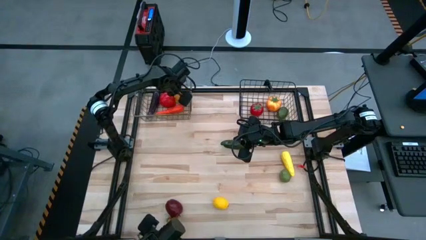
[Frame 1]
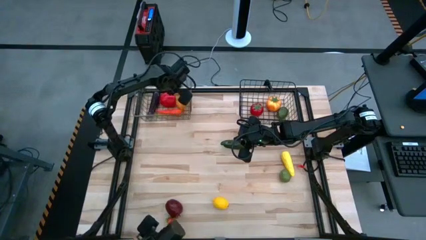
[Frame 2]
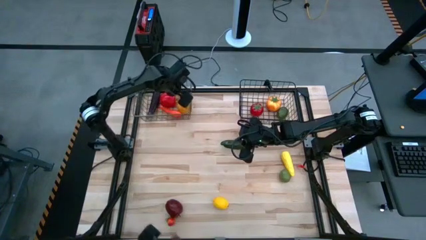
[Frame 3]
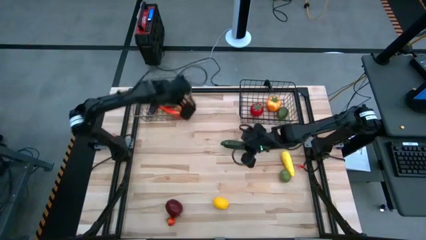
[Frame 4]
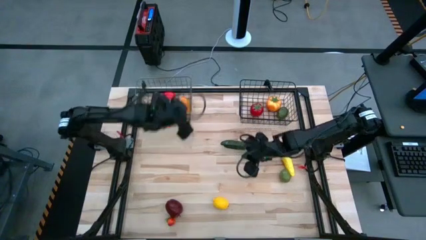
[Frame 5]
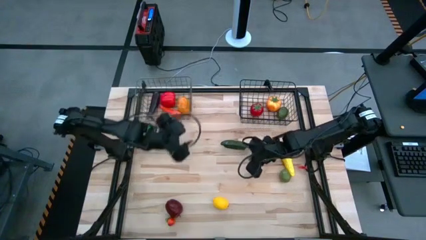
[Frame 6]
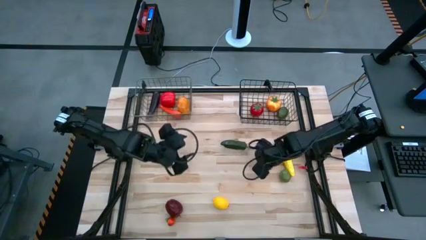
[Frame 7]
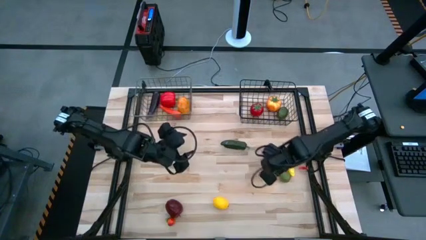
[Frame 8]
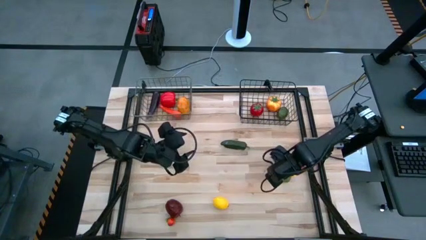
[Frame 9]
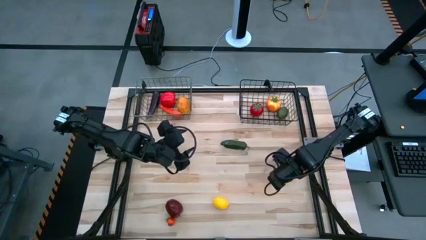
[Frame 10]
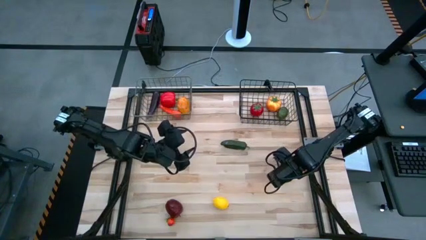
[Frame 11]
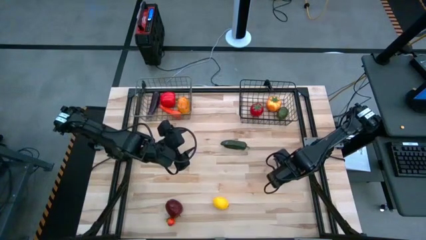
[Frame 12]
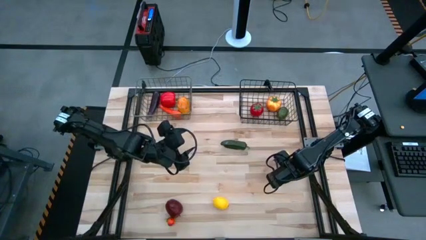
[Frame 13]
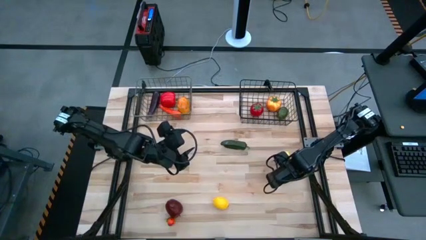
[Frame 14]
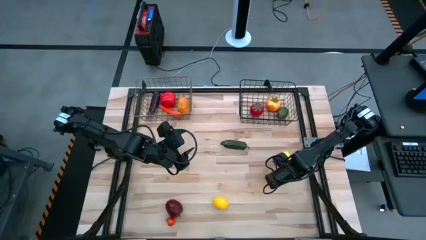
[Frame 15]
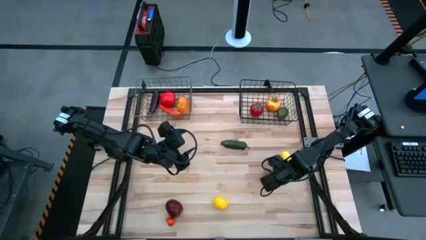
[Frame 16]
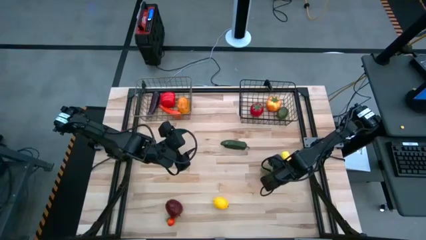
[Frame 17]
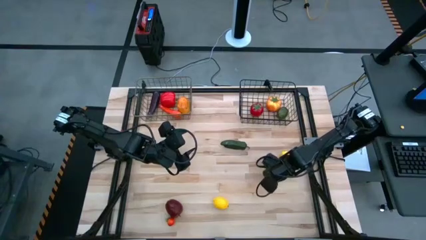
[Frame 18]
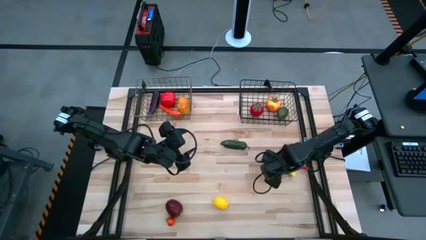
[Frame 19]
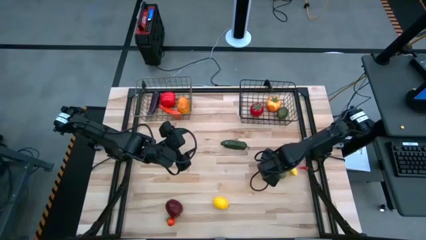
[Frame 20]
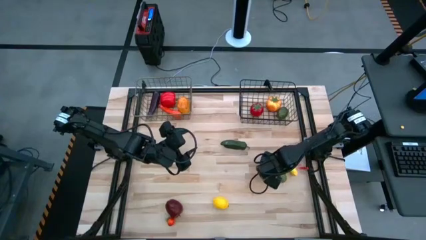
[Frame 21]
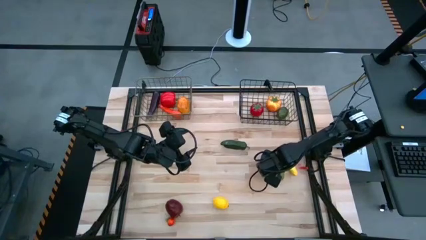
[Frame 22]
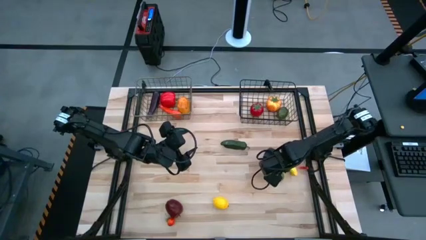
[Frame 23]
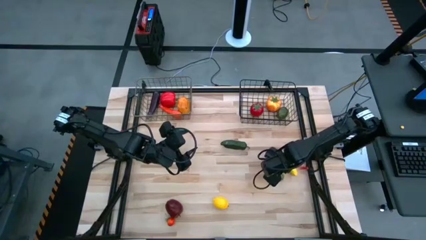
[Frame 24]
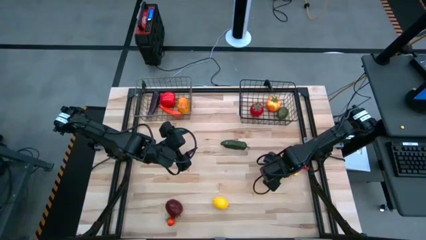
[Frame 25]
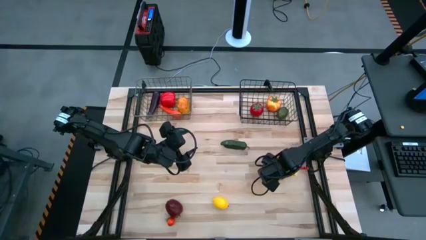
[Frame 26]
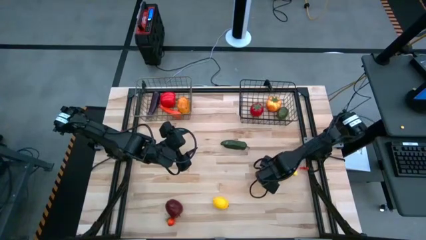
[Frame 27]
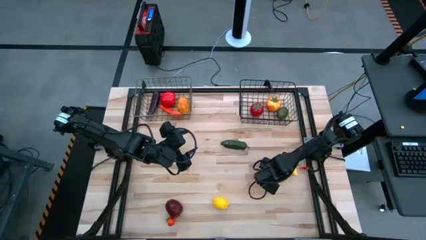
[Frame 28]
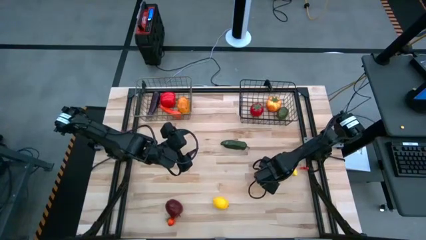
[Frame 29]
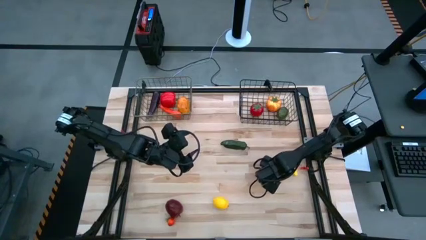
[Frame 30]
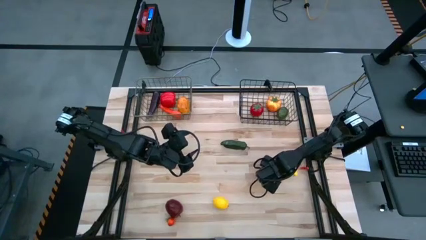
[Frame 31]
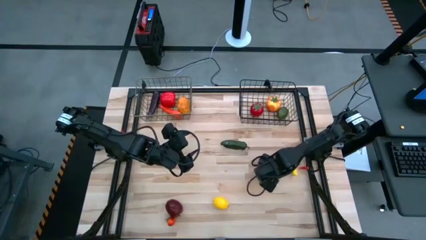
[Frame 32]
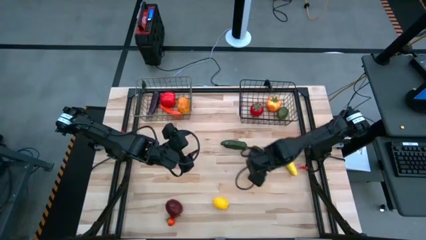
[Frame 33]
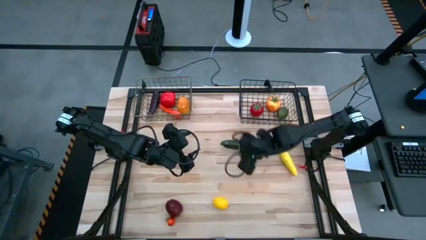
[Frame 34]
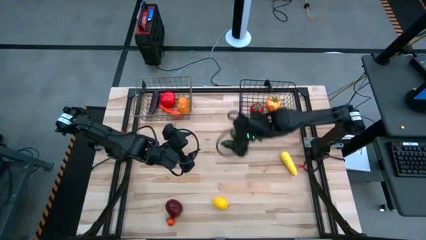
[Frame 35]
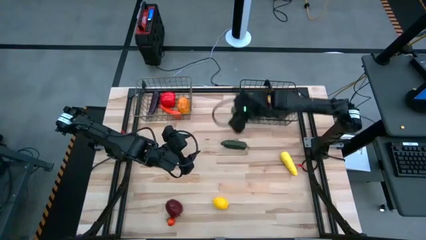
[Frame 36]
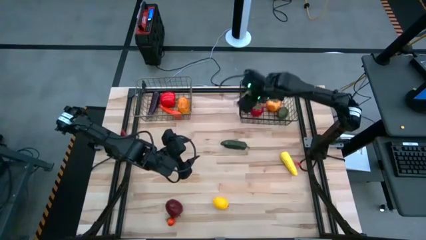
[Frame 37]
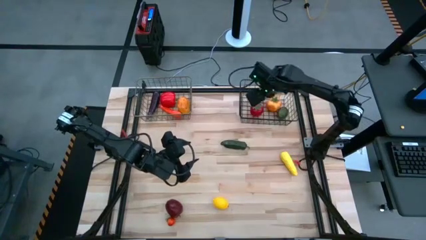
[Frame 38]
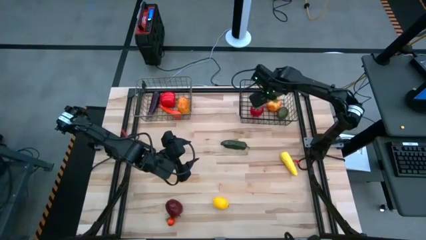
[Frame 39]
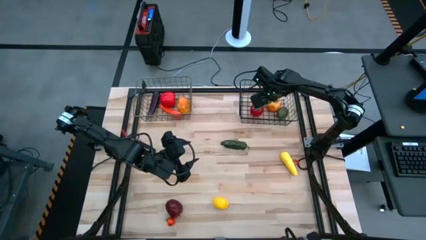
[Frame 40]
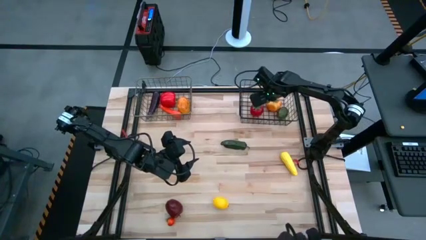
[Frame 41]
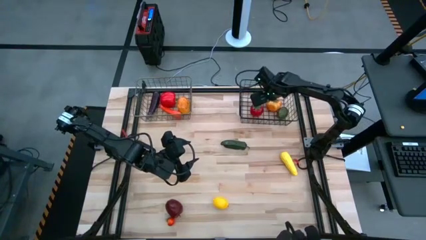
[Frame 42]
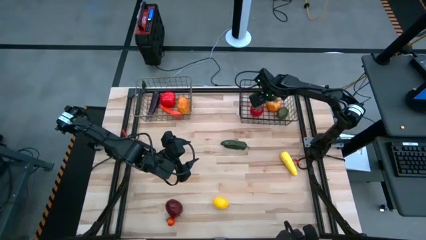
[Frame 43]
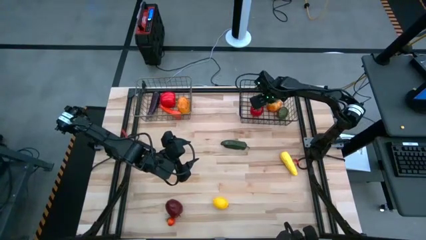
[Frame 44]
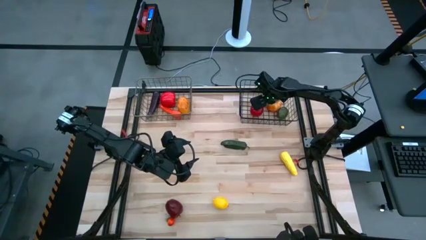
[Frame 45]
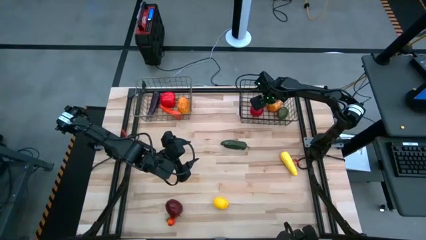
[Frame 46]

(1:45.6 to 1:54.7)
Task: Sort produce into baskets
Put the lime into the black wire basket

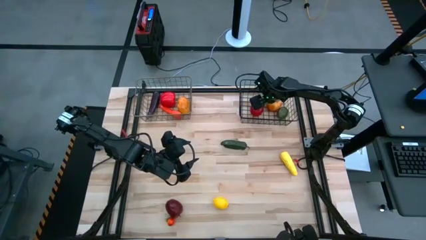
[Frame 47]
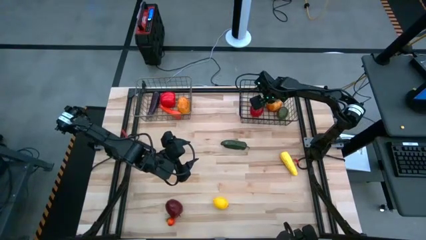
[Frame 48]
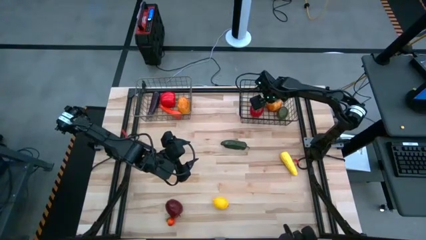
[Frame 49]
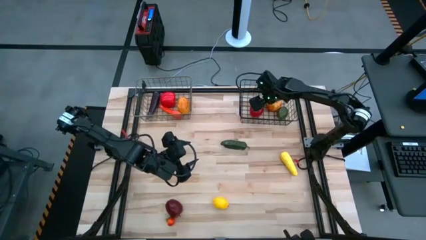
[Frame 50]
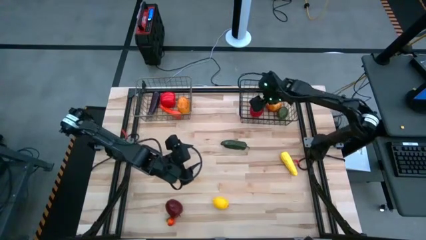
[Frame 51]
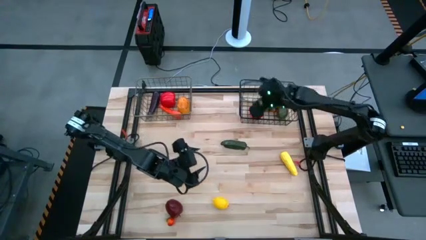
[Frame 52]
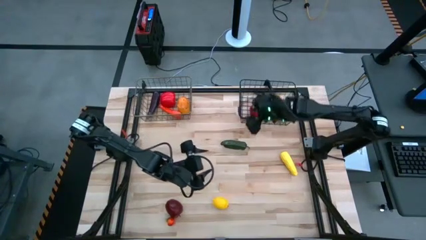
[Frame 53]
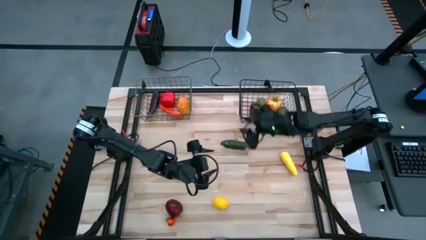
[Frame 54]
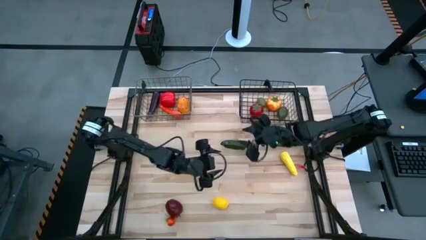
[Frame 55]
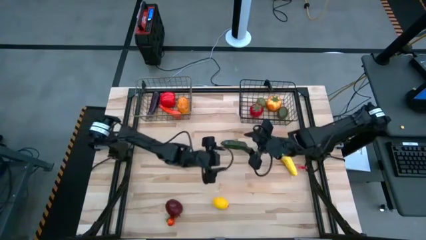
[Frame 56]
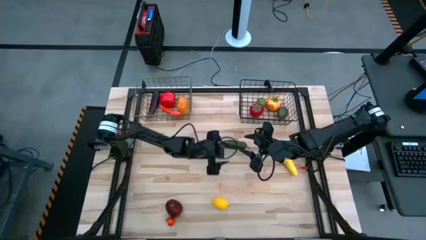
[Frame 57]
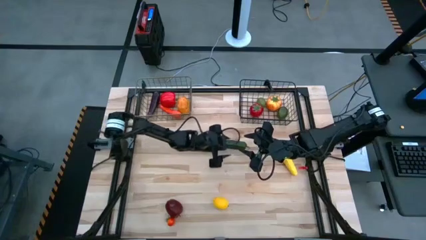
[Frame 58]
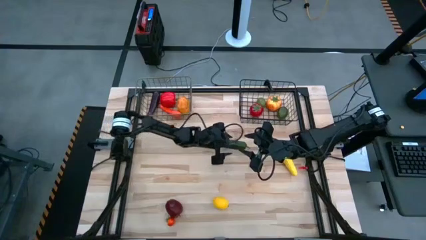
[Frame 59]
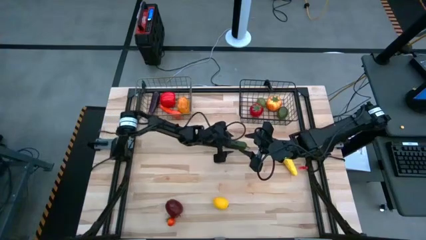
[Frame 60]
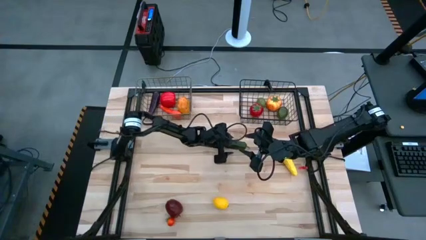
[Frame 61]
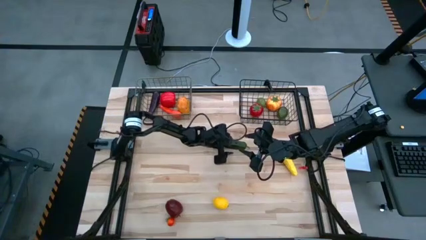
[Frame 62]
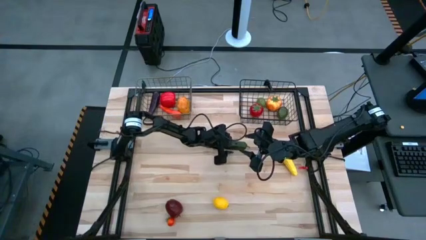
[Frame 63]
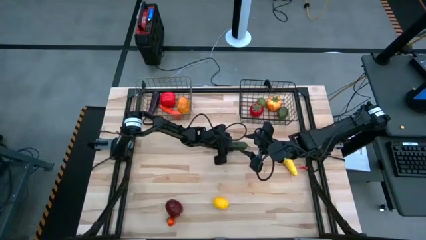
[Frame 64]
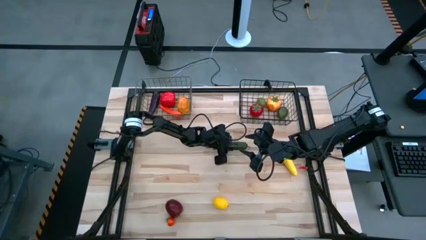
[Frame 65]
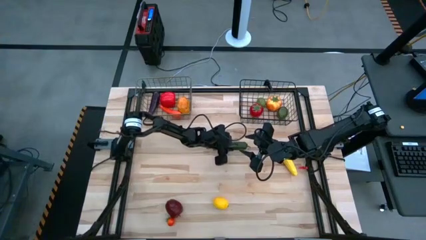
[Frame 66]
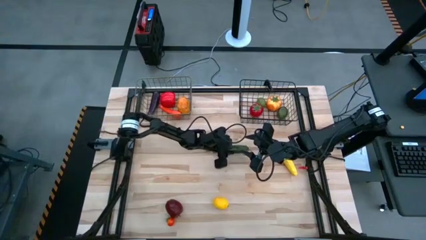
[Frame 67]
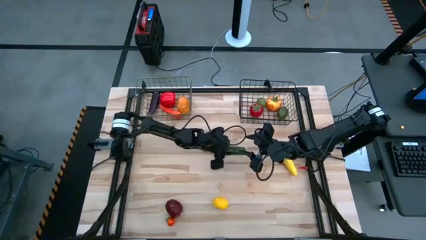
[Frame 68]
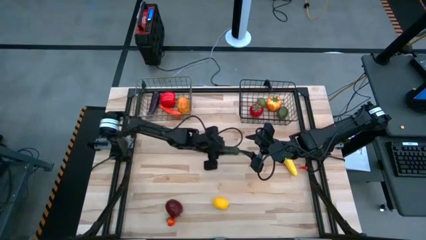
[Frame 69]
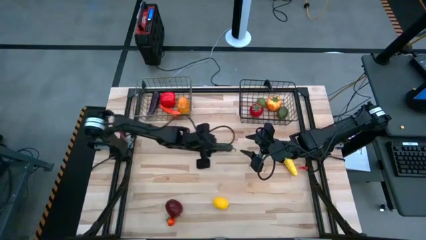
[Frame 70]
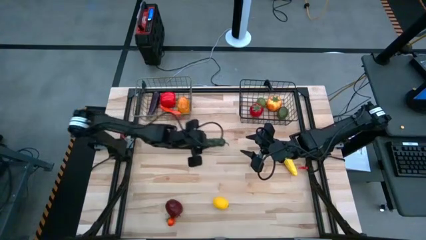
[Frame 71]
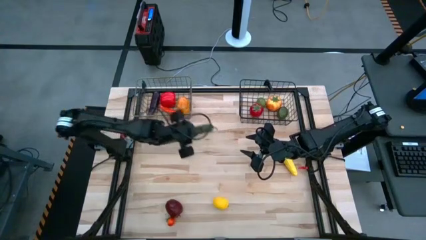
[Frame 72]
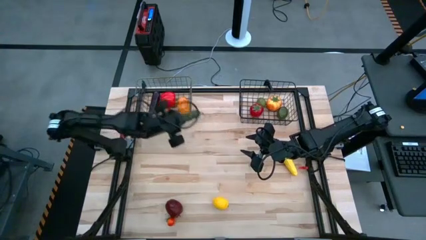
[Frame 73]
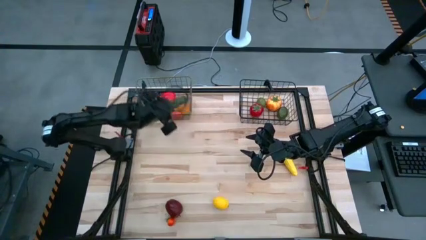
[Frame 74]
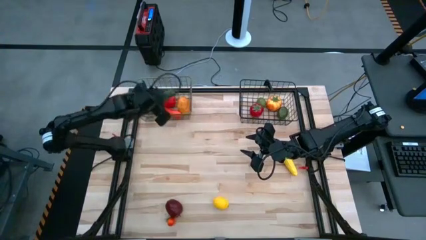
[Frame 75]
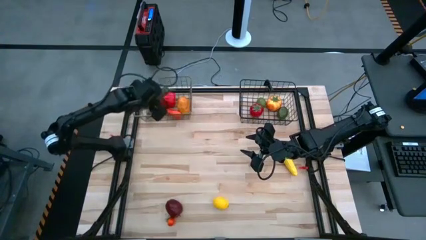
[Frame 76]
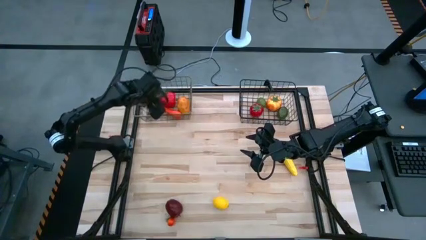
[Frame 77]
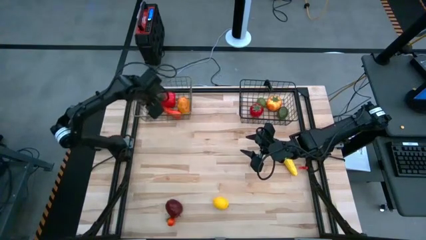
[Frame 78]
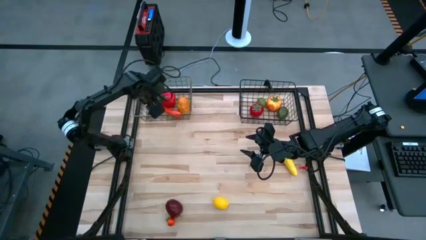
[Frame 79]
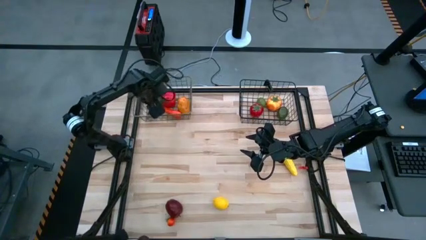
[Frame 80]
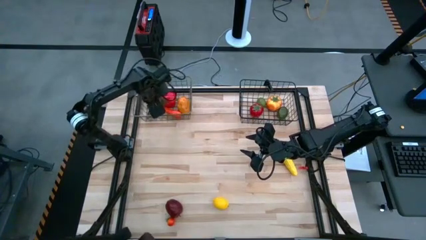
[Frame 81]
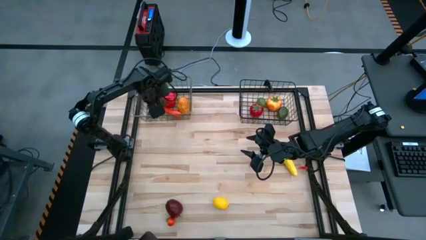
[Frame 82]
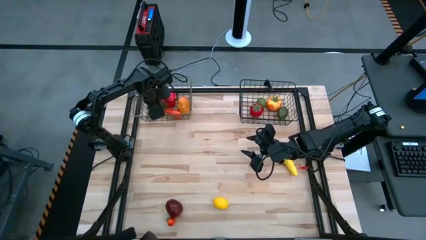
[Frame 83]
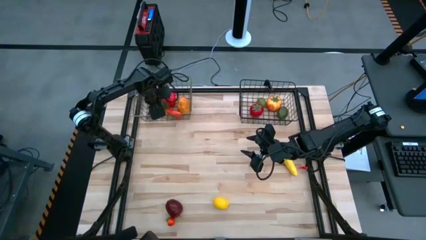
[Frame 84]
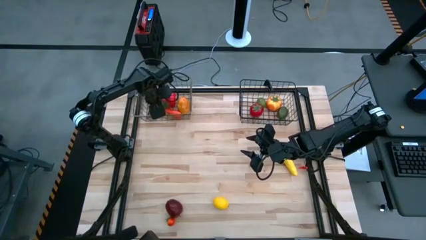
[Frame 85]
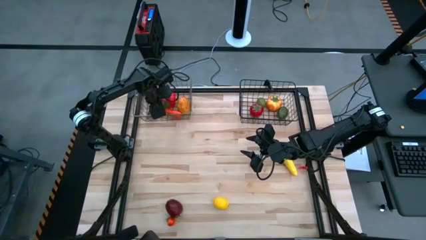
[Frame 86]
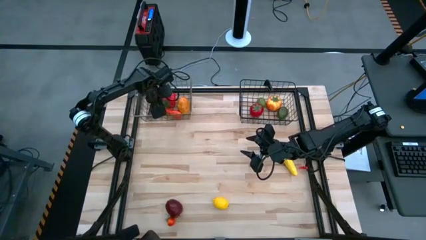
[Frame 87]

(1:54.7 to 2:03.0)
Put the chili pepper into the brown wire basket
